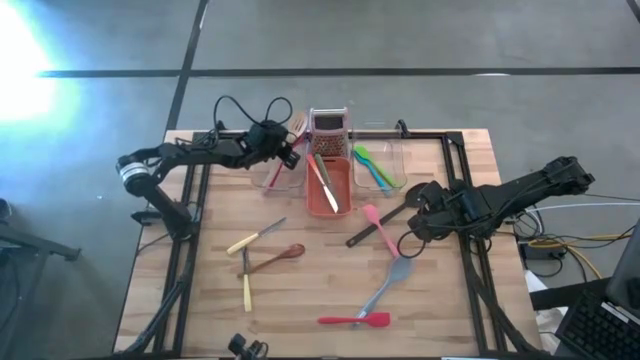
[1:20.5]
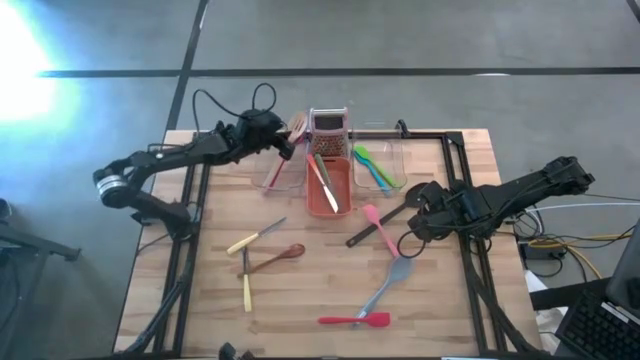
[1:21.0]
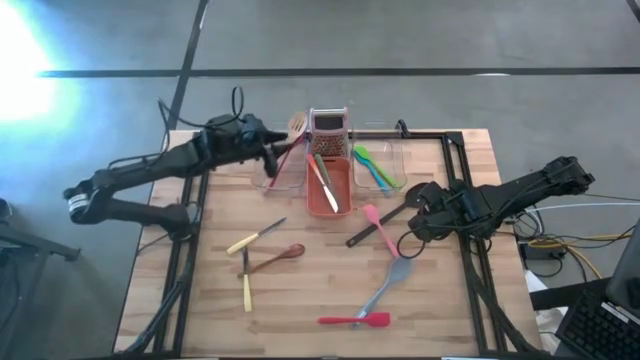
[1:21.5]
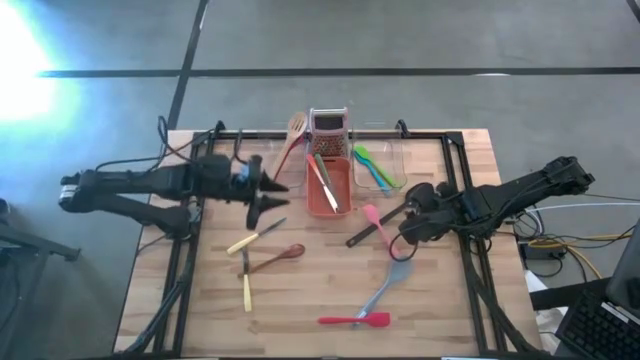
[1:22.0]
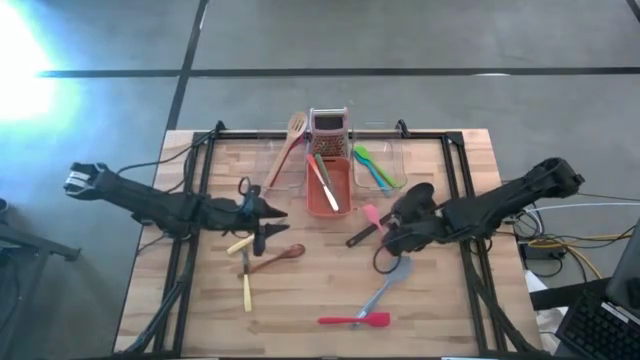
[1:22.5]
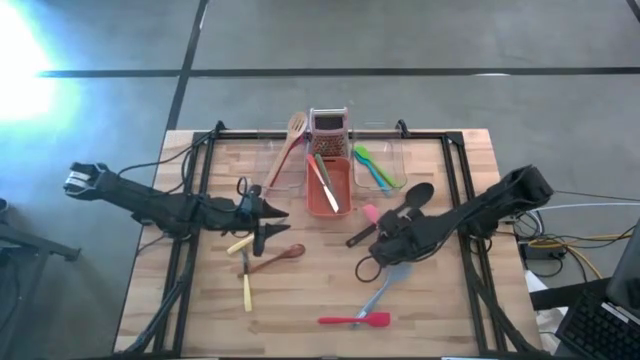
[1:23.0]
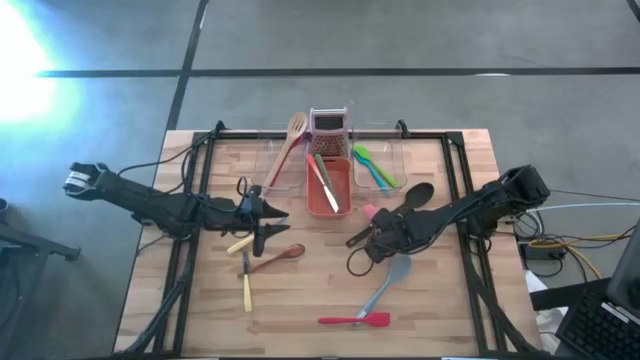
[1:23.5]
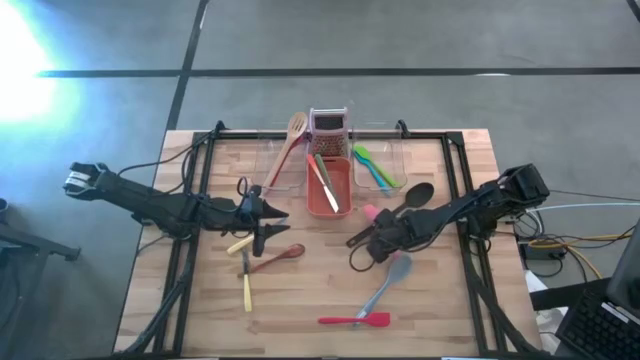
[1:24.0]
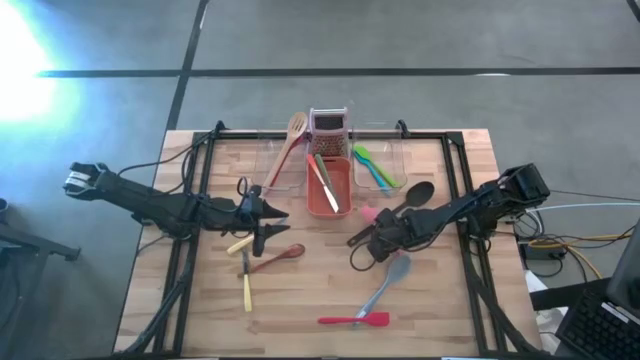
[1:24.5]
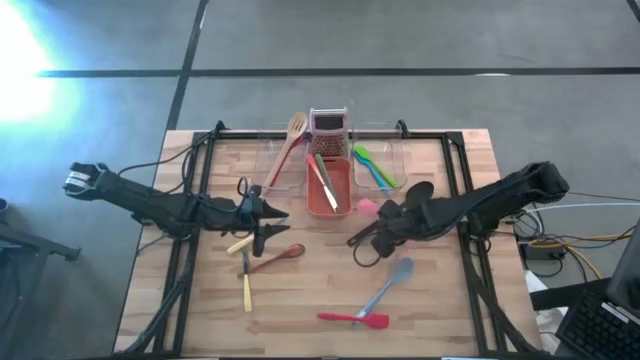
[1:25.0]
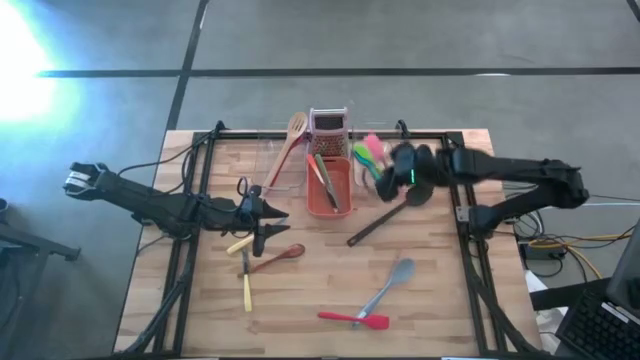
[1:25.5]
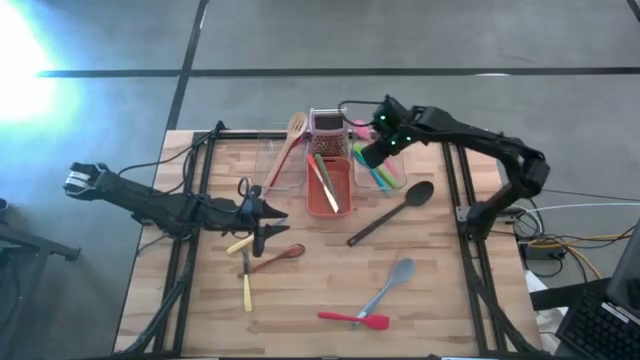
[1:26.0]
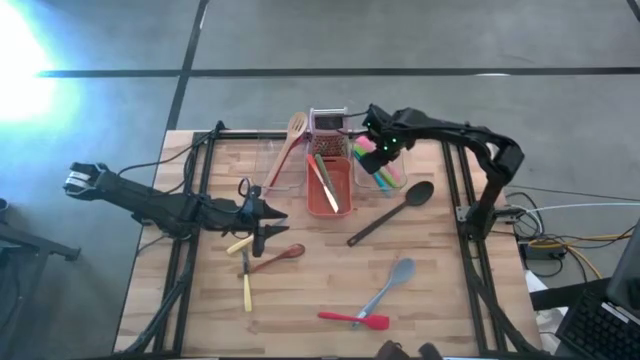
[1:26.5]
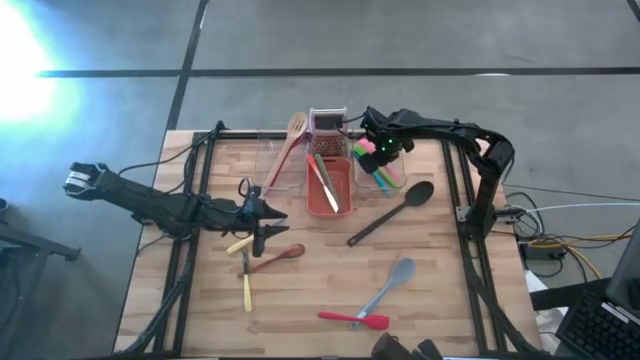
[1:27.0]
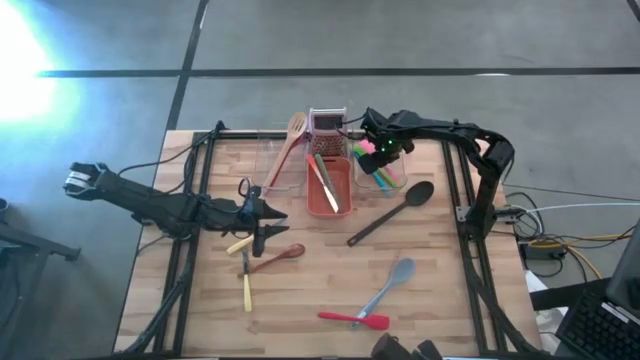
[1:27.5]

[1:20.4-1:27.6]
Task: Pick & Place Kitchen Items
Put the pink spatula into the right transparent bin

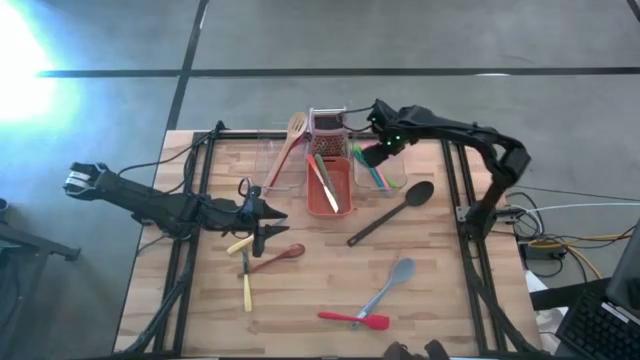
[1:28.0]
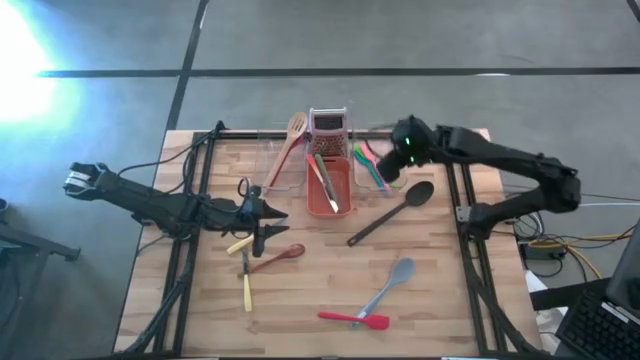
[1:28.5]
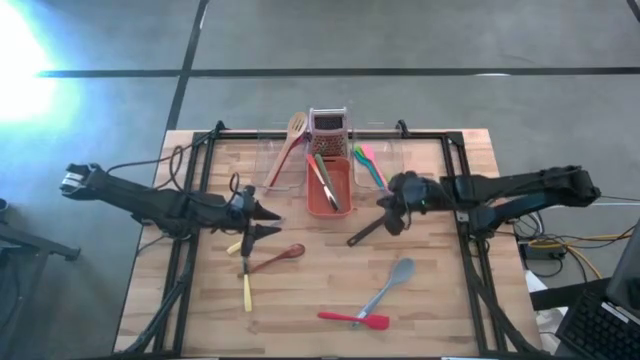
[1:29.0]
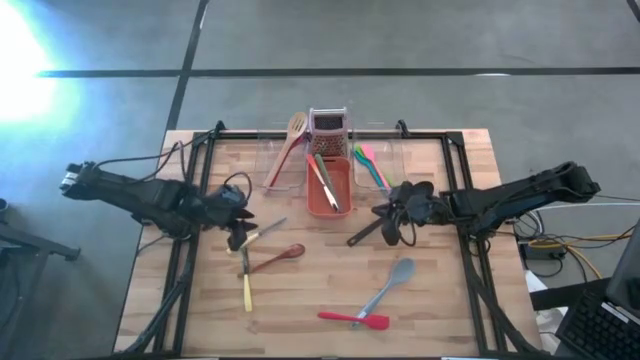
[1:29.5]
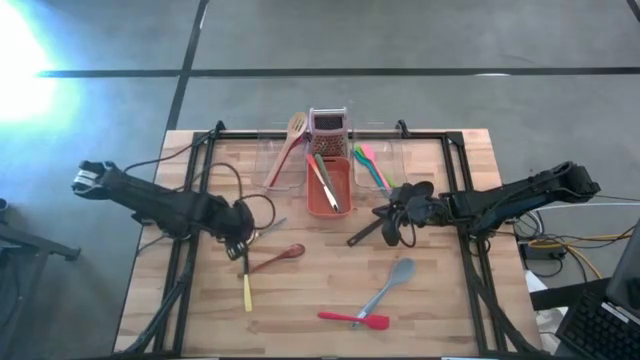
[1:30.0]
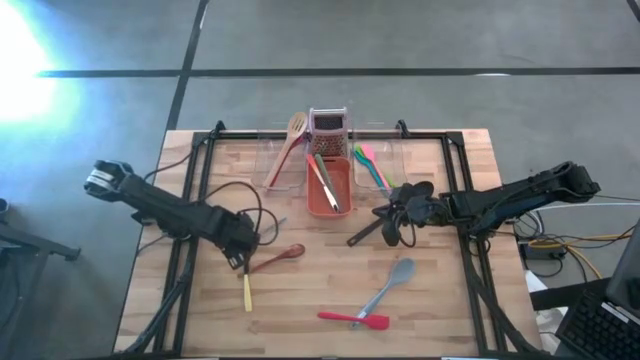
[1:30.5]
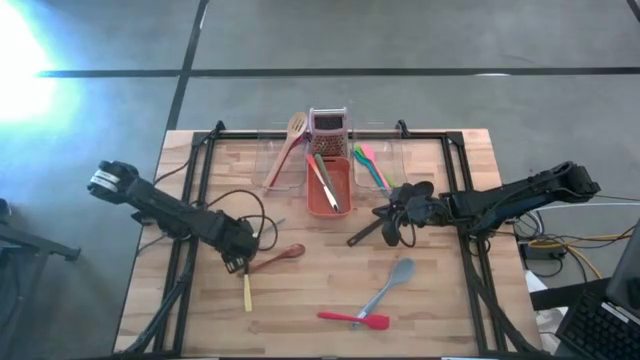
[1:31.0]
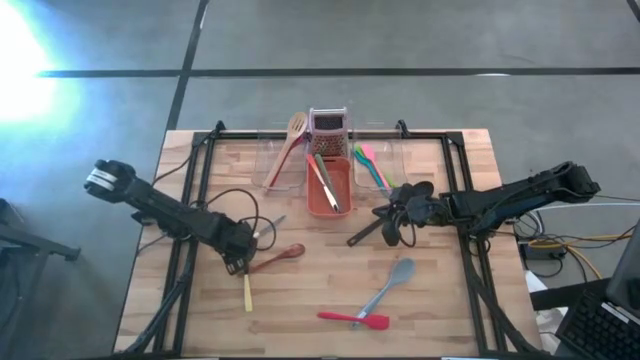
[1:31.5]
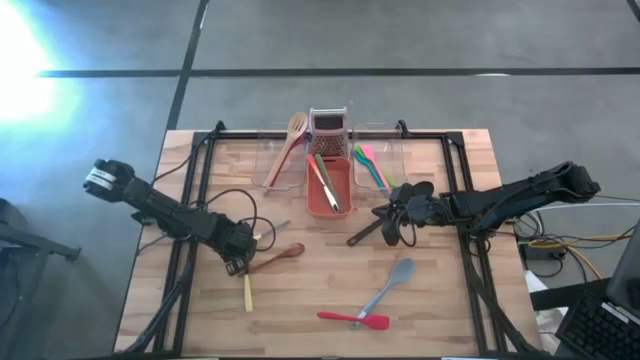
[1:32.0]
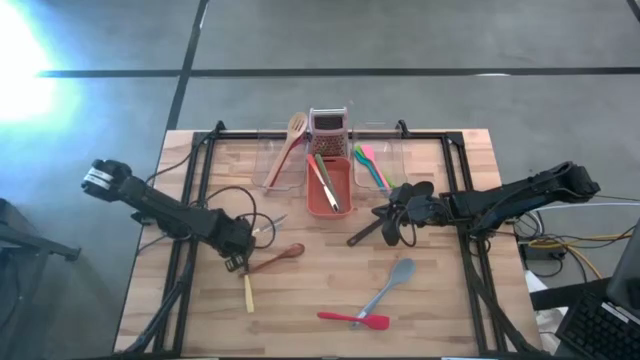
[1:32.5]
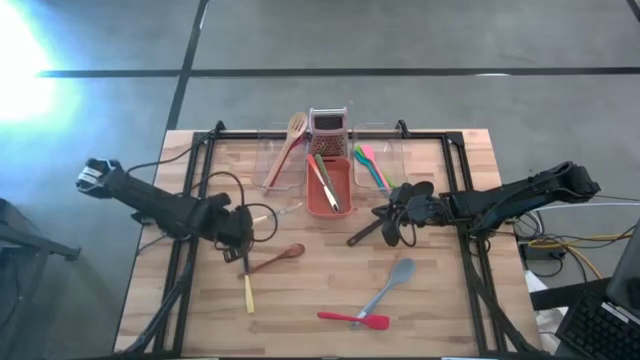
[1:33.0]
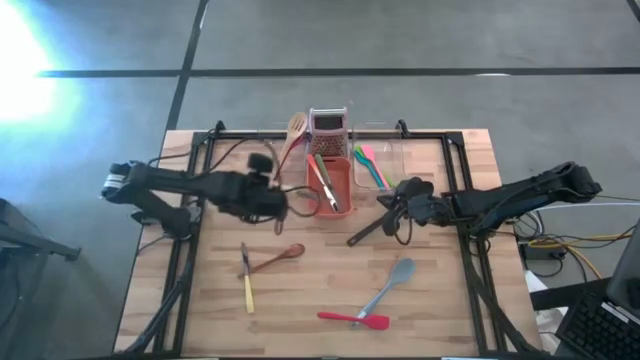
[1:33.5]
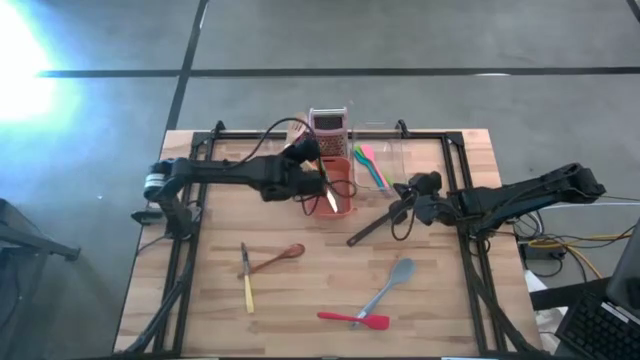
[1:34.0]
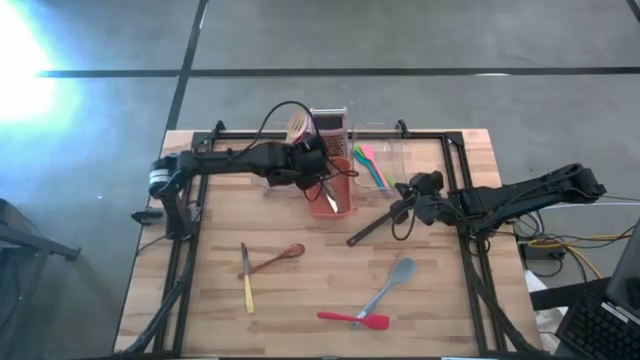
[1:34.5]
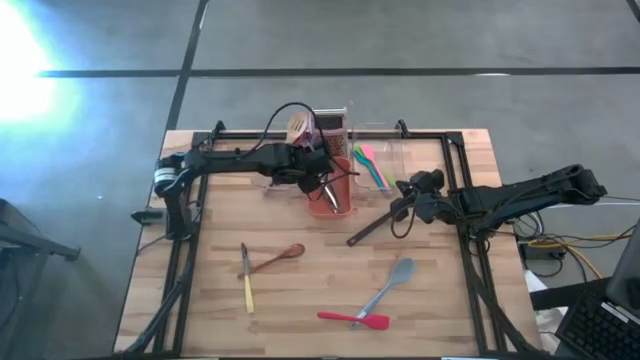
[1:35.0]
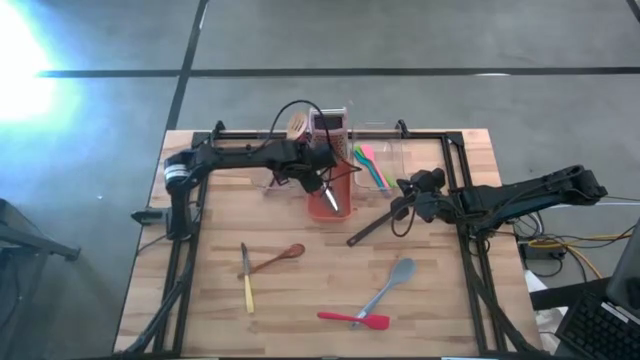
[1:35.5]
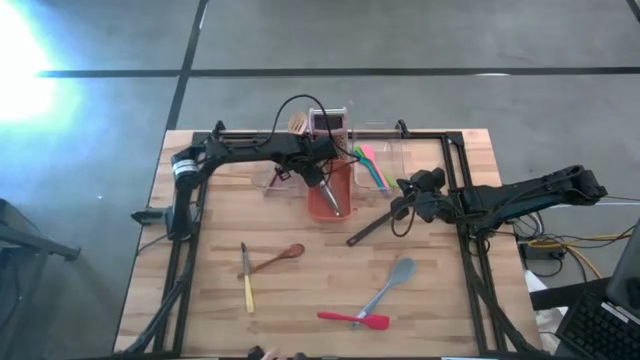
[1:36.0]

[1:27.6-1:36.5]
Put the top yellow table knife into the orange bin

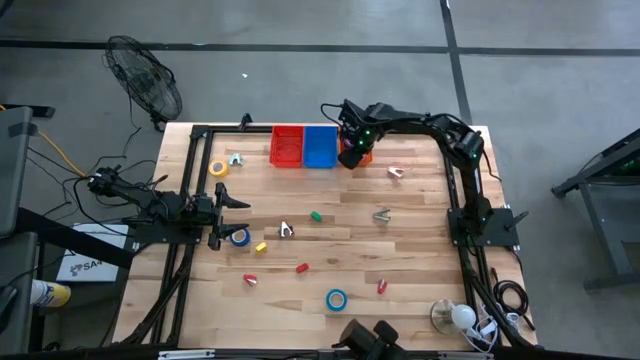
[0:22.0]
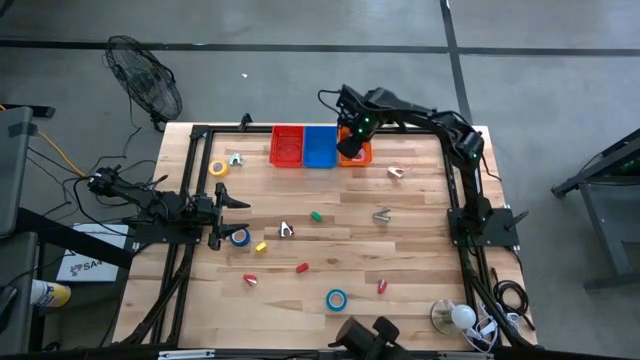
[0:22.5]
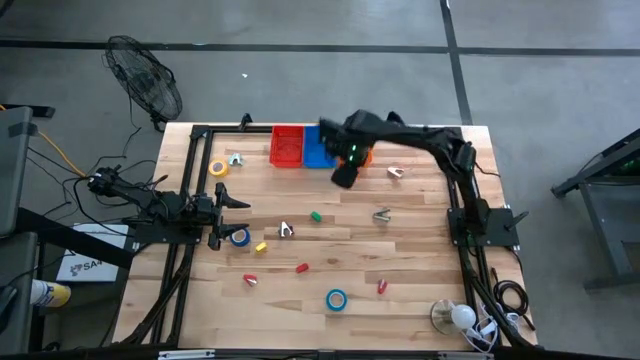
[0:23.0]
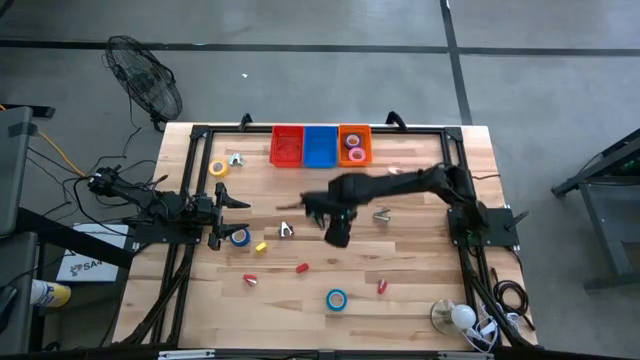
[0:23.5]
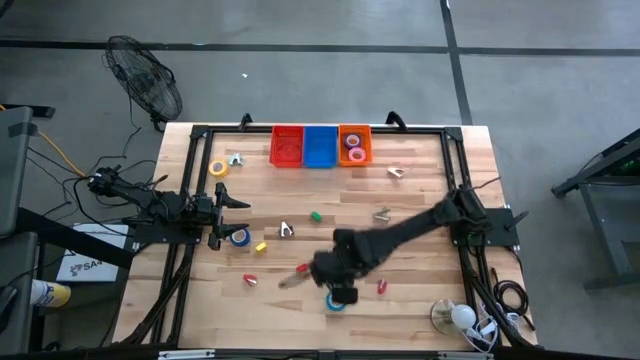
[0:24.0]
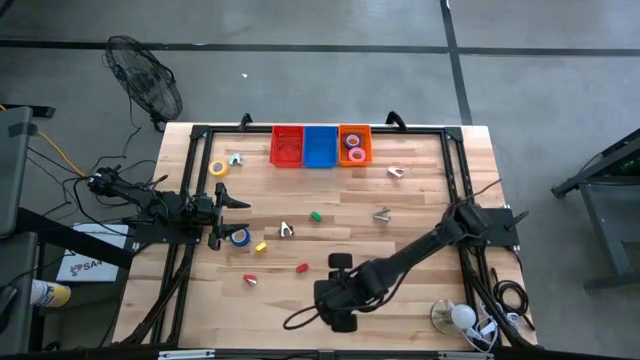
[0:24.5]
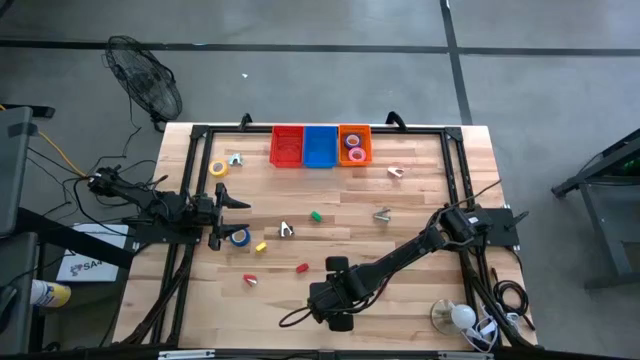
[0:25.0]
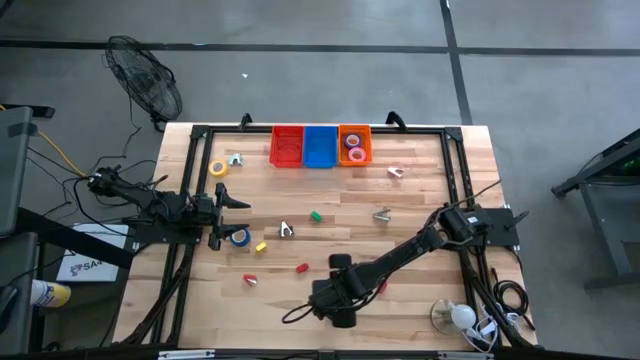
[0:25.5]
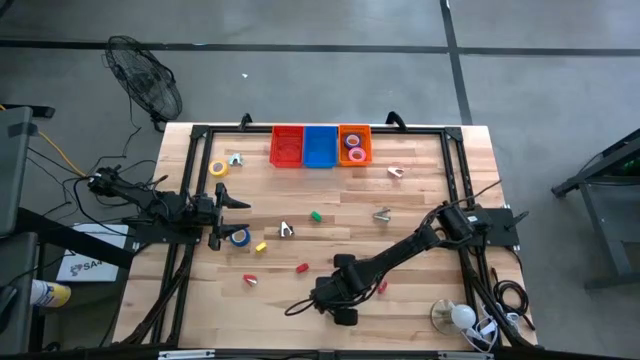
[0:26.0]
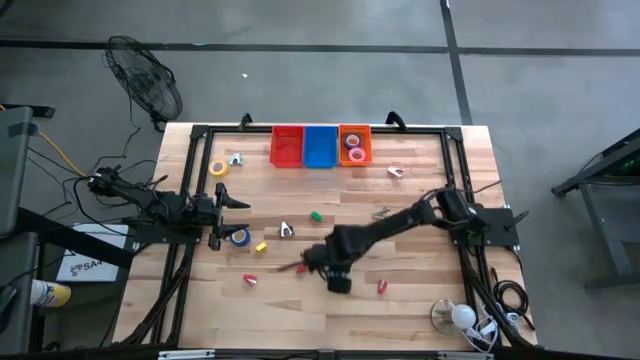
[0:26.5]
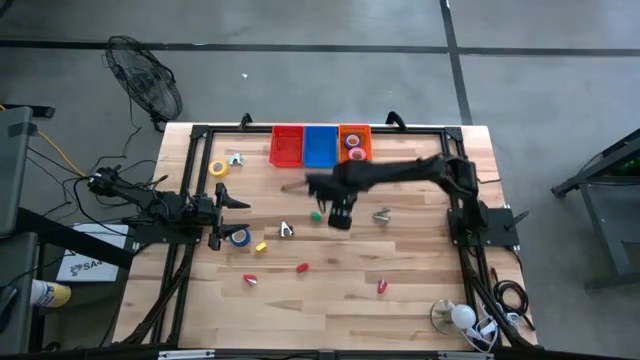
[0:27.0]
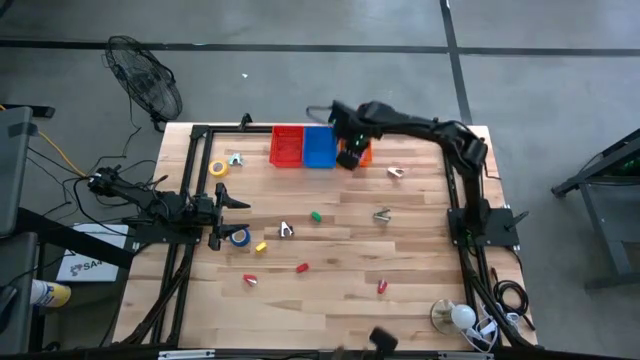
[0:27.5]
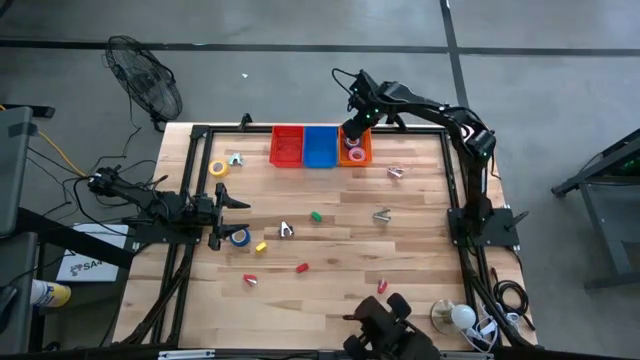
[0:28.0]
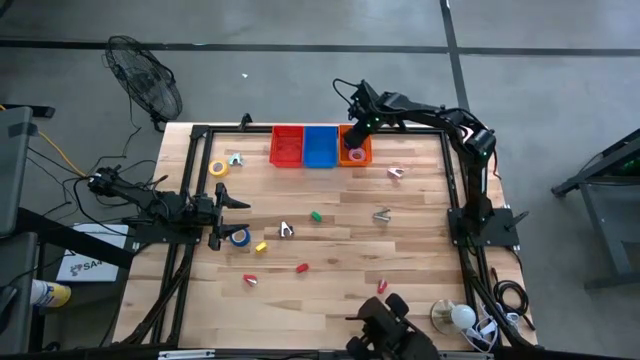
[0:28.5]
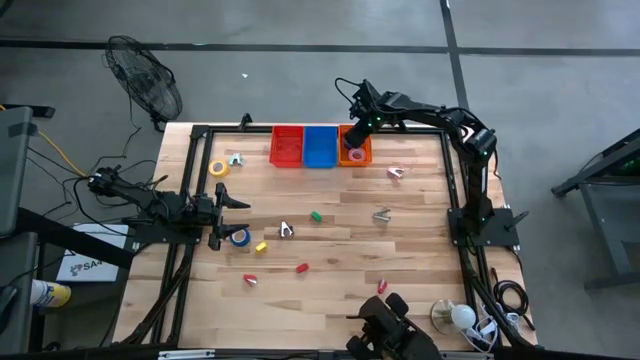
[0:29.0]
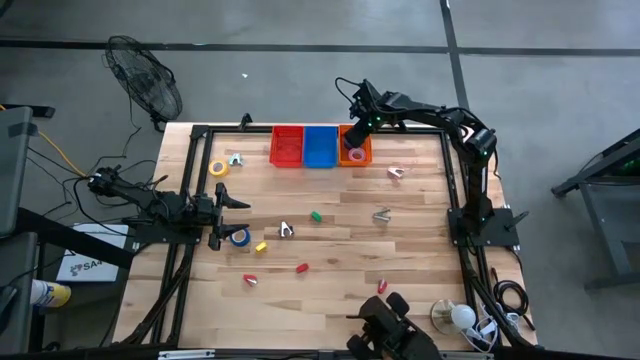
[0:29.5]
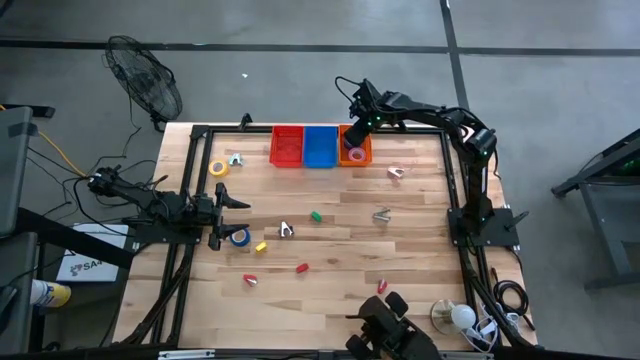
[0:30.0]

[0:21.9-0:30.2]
Task: Pick and place Stapler, Stapler remover, tape
Put the light blue tape into the orange bin
